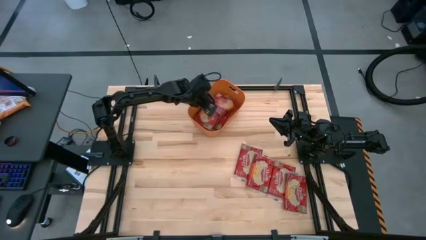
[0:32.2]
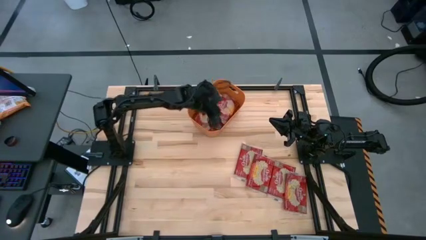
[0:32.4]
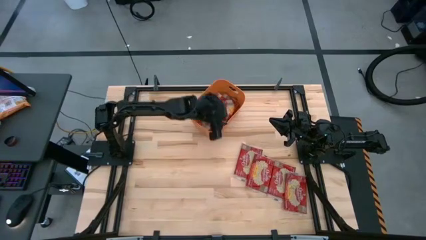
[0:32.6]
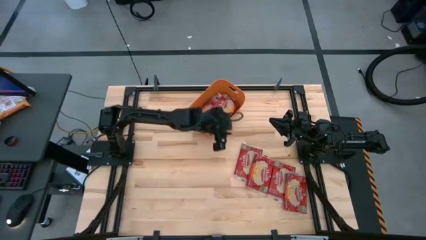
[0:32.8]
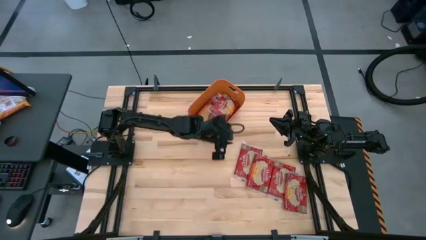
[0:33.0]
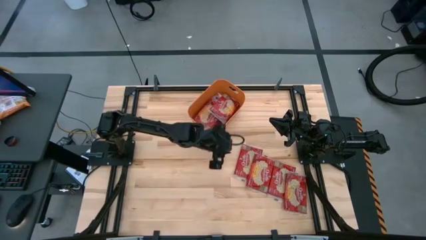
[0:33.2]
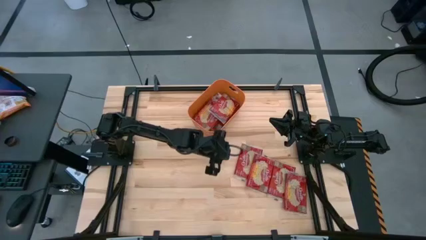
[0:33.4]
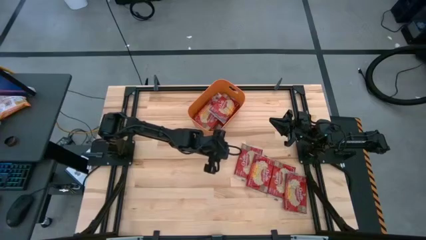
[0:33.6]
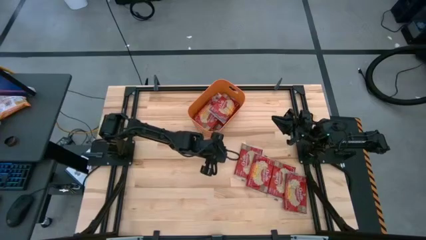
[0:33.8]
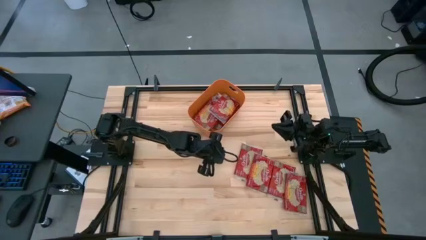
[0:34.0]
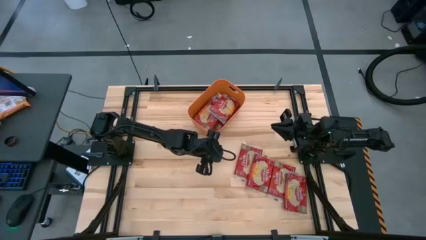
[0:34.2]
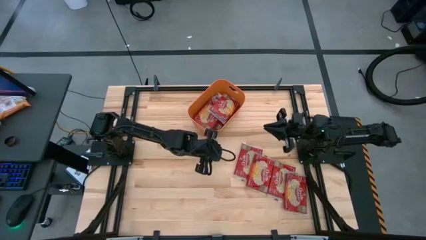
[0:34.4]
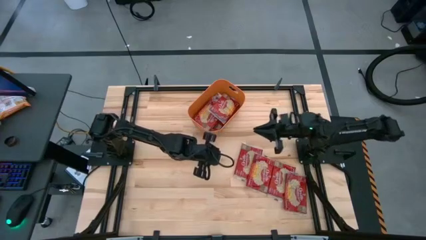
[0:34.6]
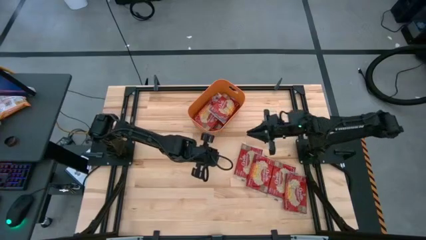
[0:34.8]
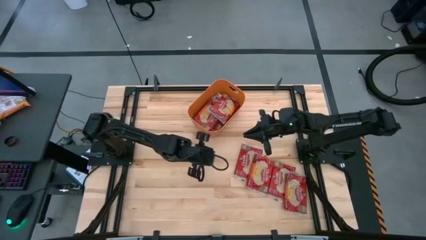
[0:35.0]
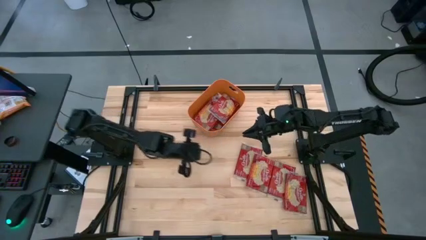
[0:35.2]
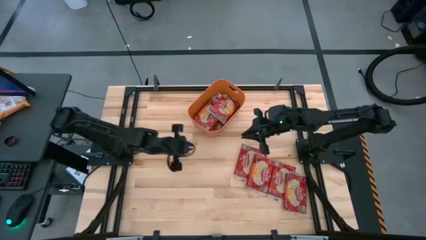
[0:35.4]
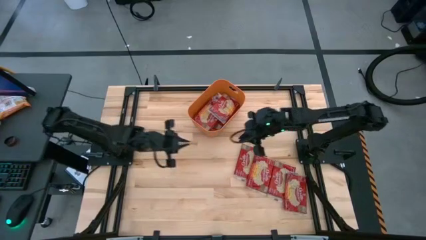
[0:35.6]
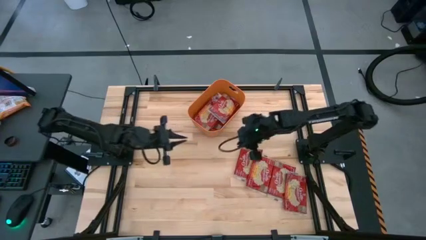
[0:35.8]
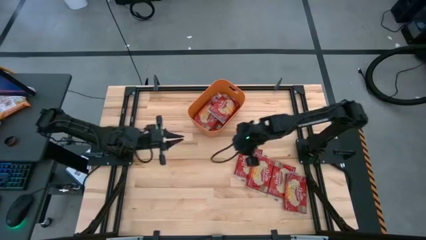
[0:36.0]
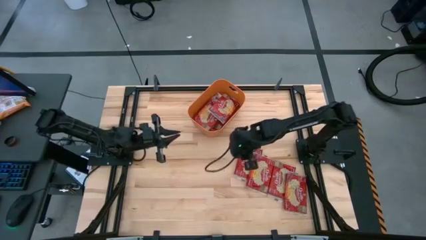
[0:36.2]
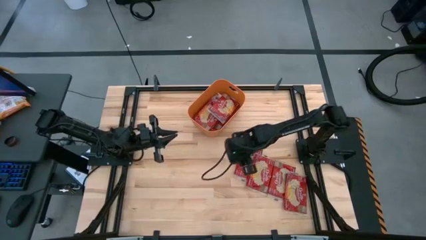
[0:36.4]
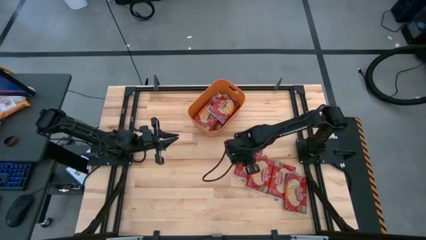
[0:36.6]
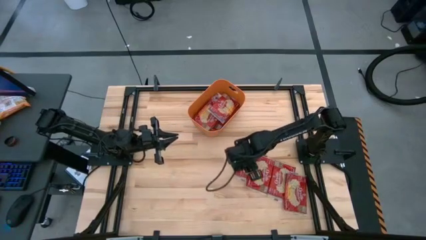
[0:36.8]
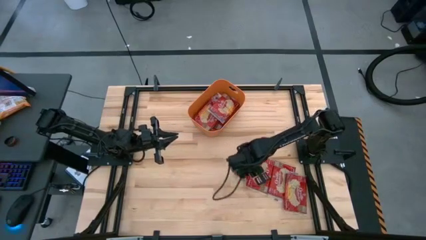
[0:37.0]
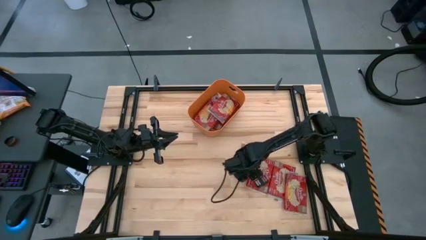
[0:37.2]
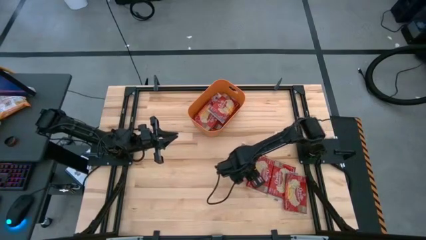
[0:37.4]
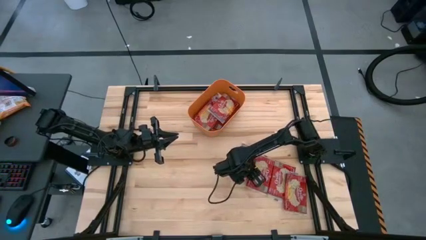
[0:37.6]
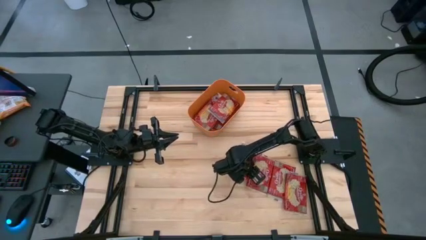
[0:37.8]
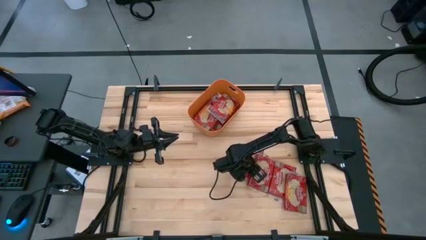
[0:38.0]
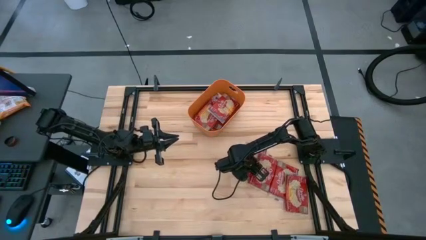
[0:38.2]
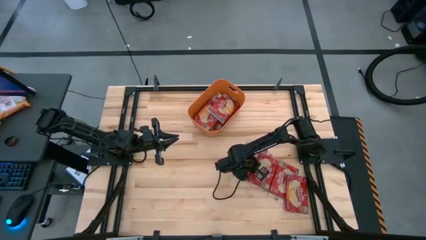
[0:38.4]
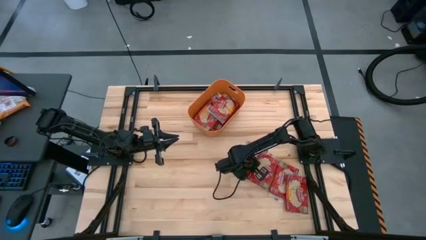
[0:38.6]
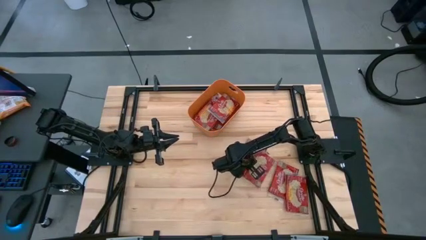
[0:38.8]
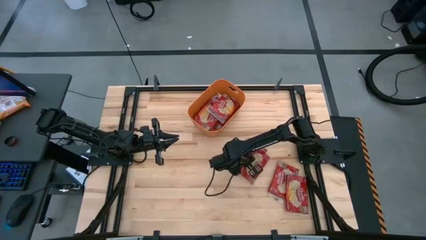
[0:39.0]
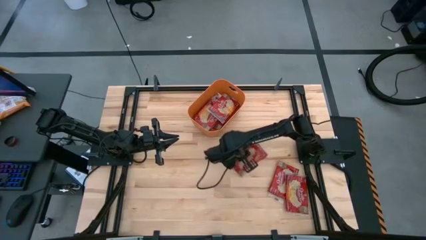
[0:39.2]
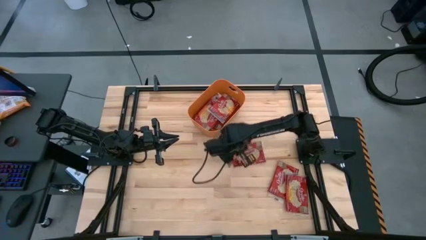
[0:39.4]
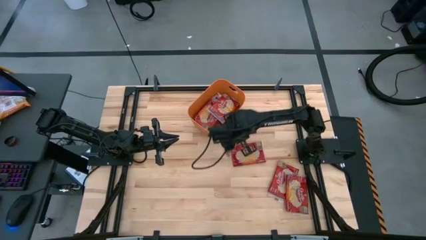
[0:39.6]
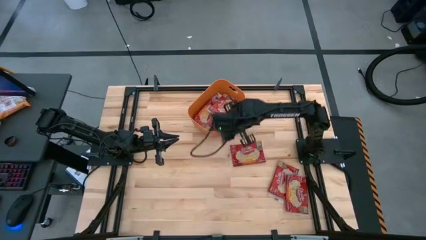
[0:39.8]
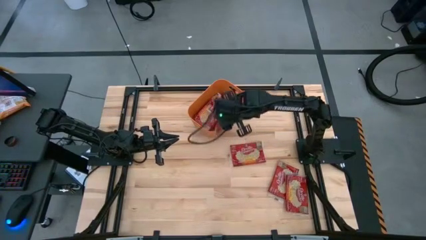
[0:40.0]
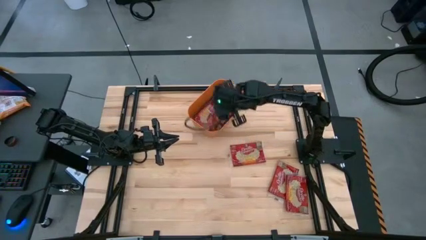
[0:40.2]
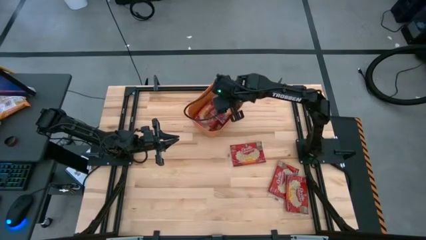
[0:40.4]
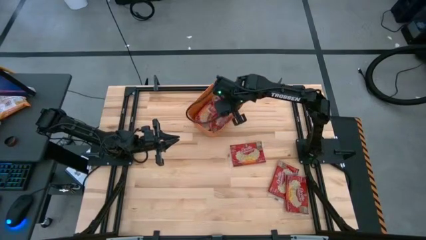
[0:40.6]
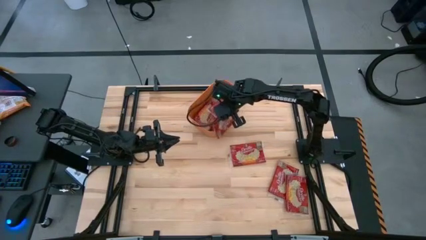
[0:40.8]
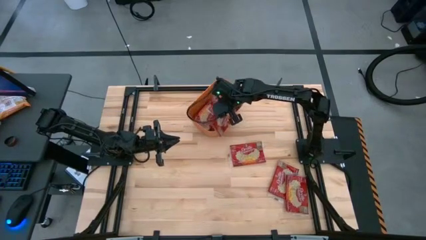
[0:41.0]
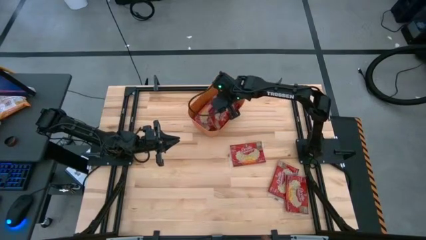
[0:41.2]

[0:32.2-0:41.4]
Task: Sort popcorn bags into baskets
Put the red popcorn bag into the orange bin

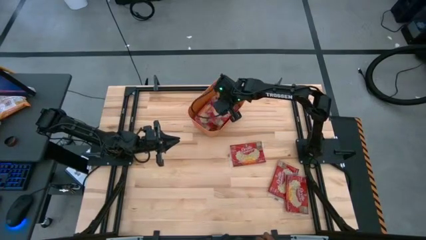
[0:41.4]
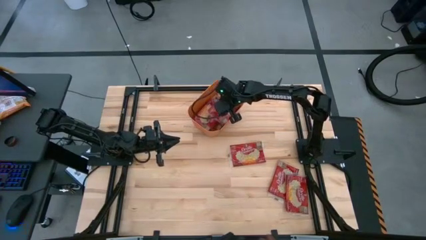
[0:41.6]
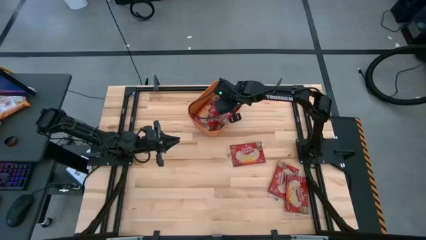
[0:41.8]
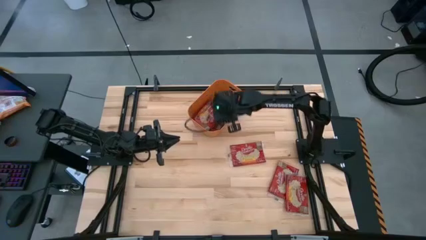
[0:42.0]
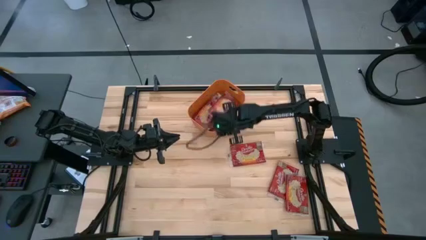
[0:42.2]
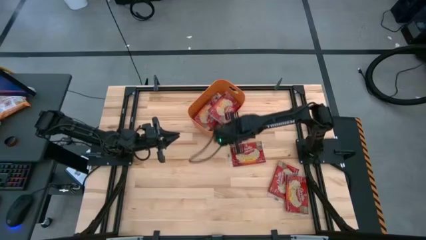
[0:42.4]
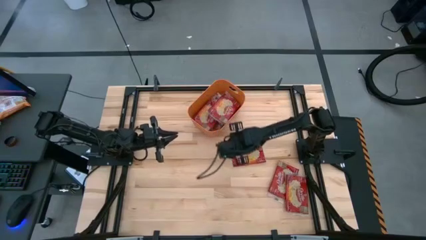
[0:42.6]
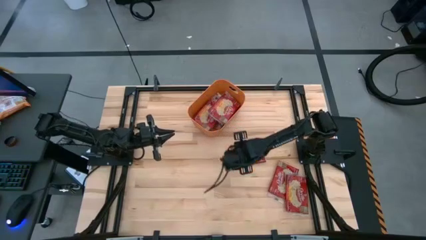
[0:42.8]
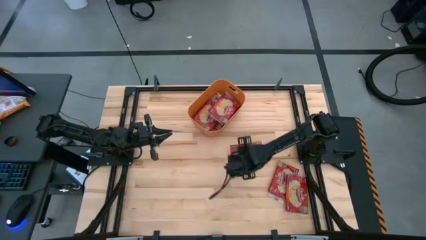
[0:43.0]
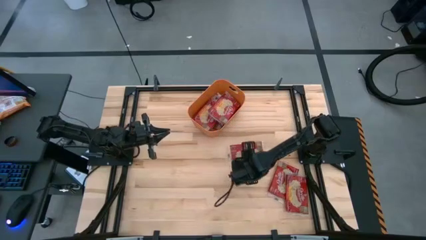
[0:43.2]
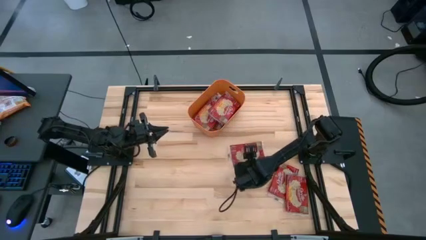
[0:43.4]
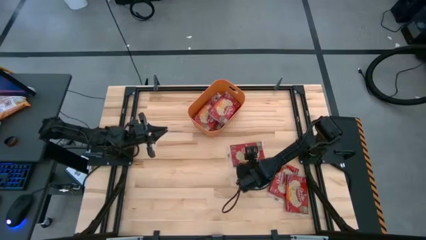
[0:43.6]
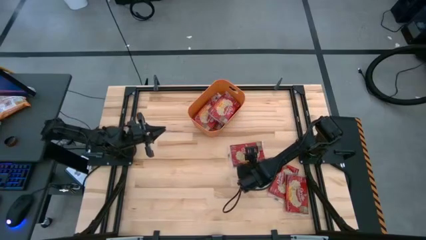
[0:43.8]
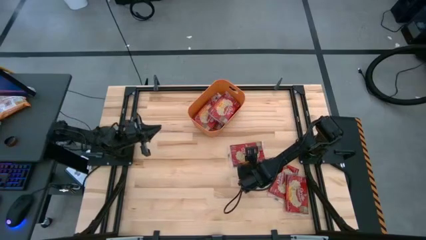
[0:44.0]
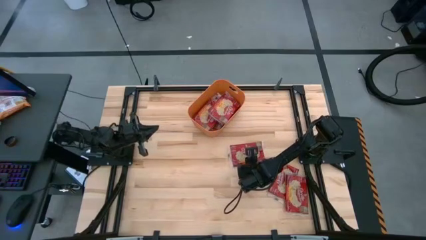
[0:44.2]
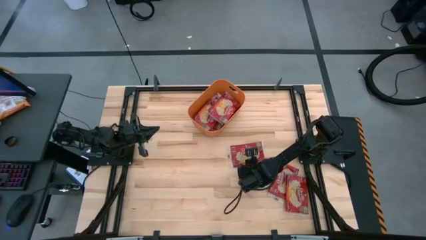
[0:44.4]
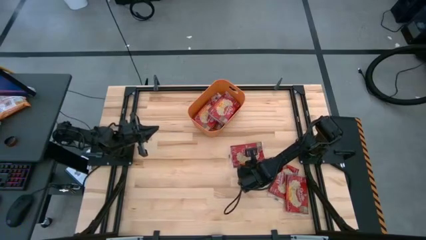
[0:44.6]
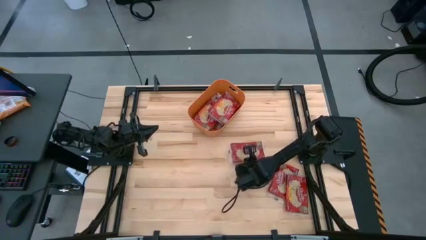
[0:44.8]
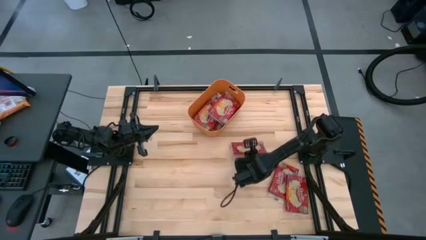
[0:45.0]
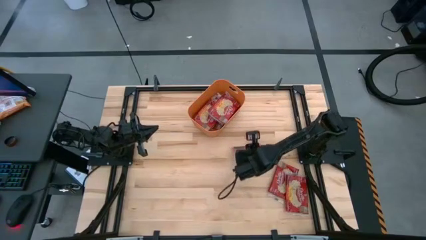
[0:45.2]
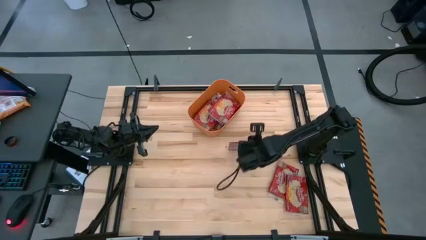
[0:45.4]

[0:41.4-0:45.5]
Put the red popcorn bag into the orange bin

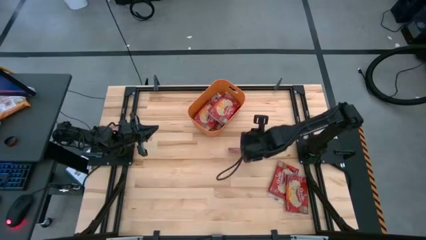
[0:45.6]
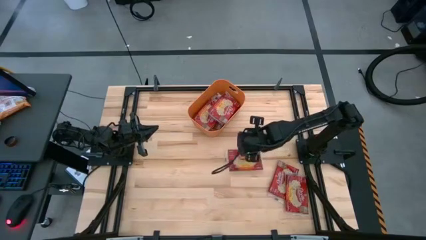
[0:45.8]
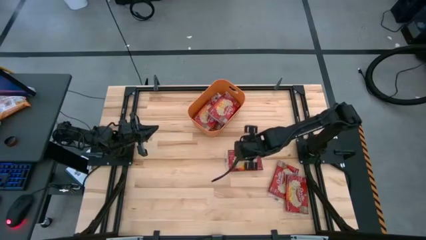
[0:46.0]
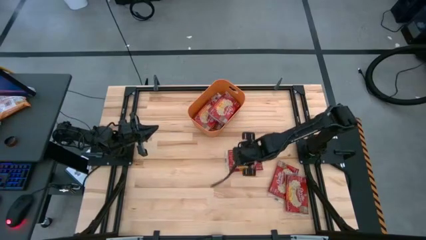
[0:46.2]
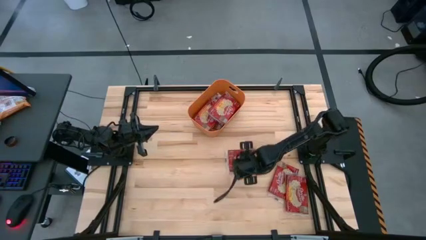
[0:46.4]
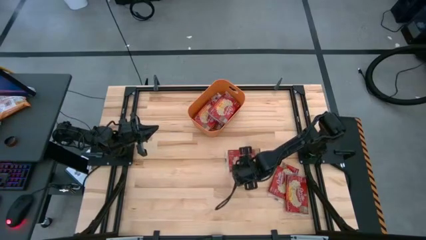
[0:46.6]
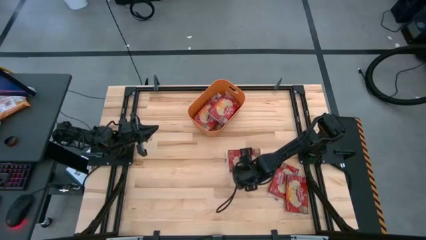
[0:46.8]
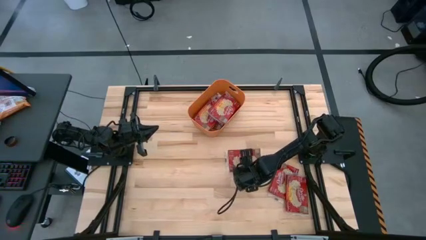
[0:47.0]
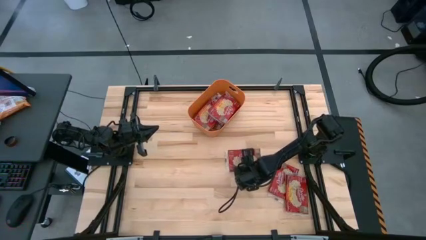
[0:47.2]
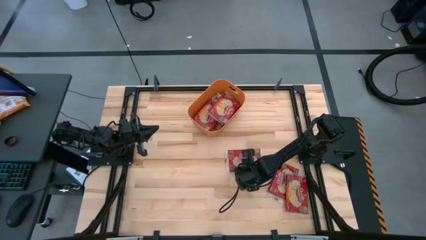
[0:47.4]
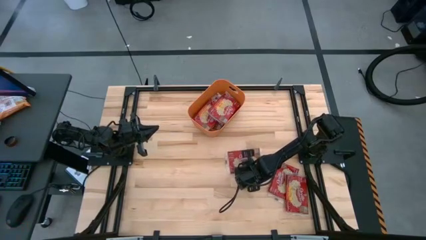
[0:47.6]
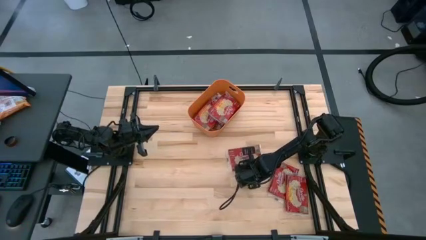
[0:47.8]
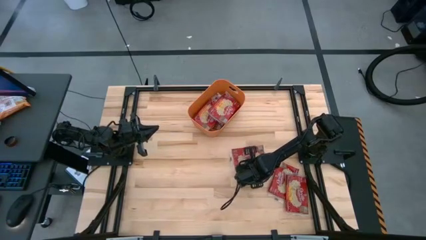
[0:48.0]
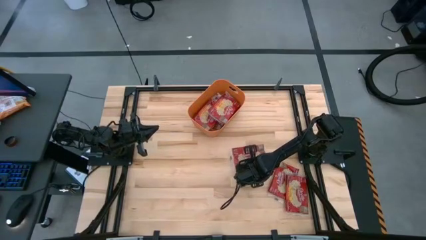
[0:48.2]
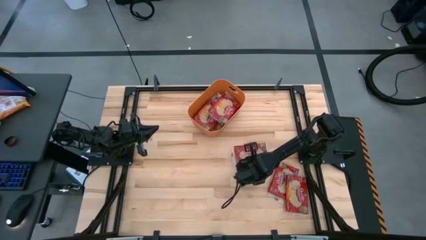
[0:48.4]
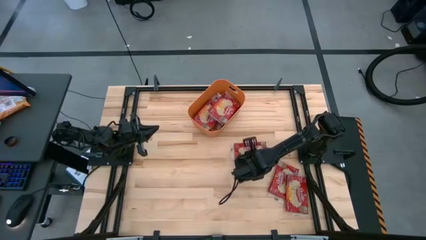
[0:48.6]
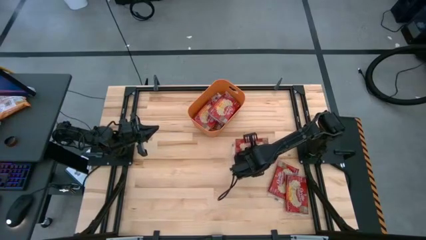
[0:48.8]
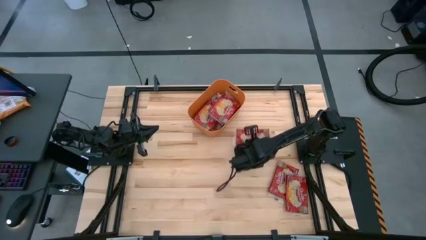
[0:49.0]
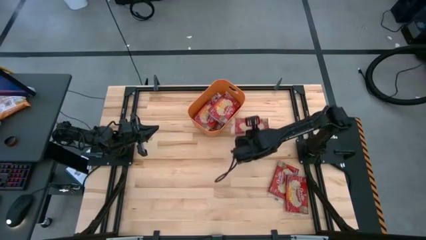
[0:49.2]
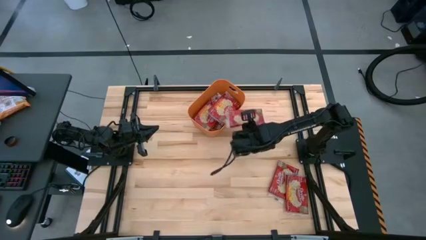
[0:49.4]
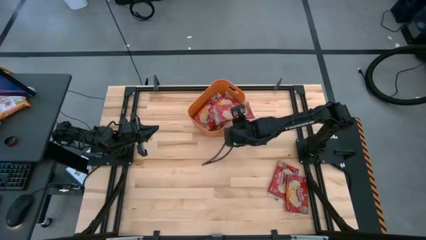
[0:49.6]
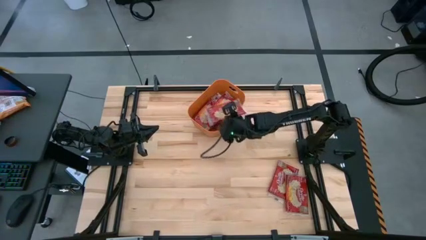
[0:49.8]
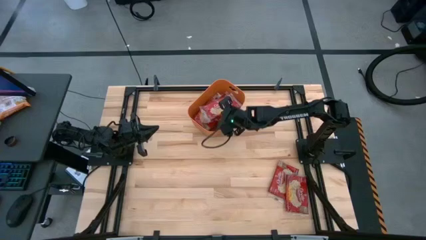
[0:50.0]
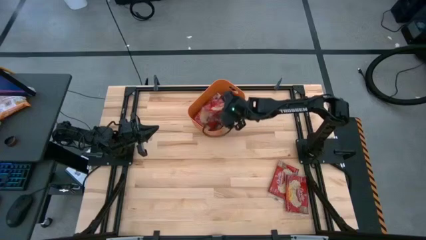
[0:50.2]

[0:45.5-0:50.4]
Put the top red popcorn bag into the orange bin
